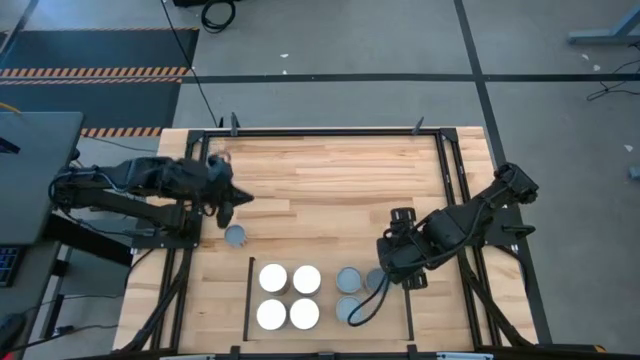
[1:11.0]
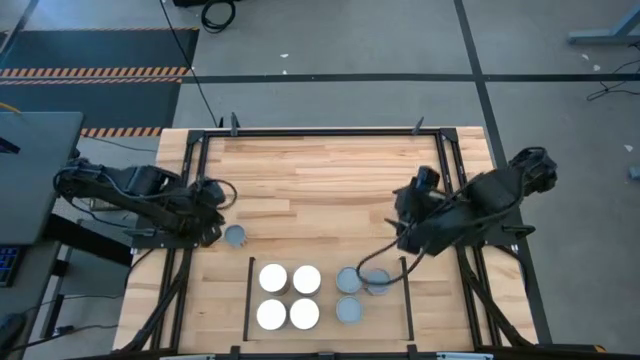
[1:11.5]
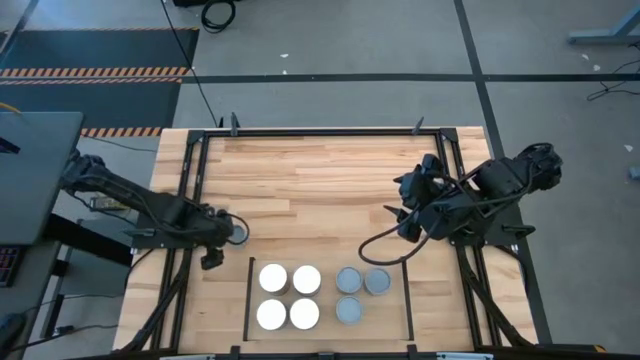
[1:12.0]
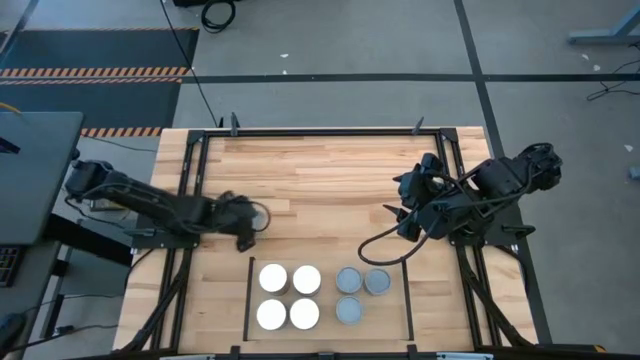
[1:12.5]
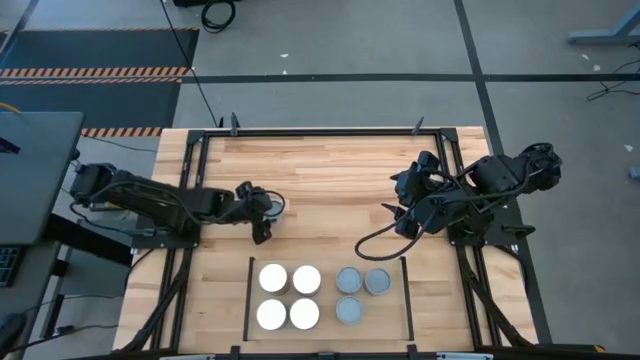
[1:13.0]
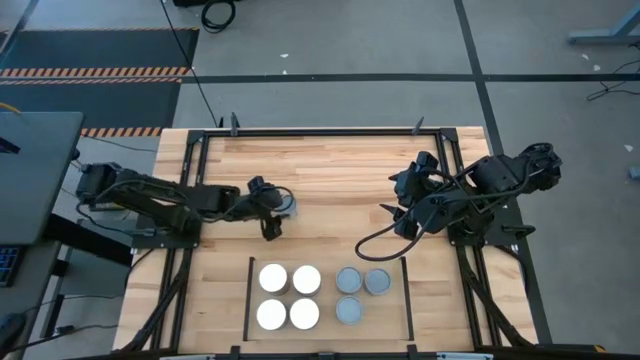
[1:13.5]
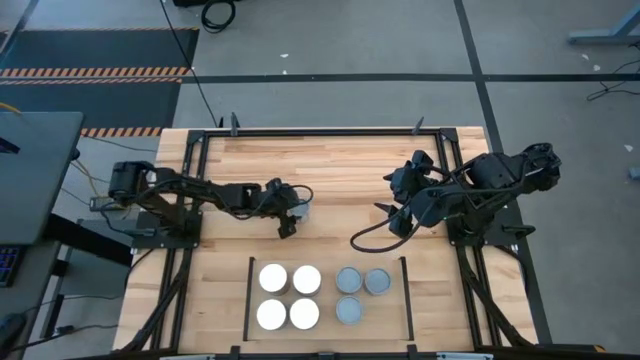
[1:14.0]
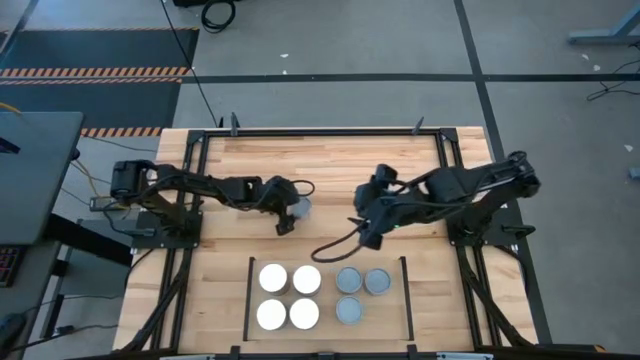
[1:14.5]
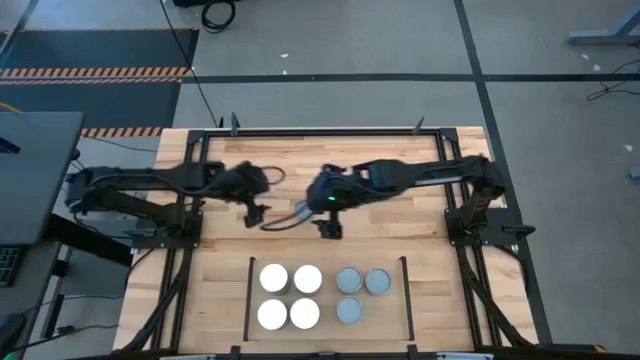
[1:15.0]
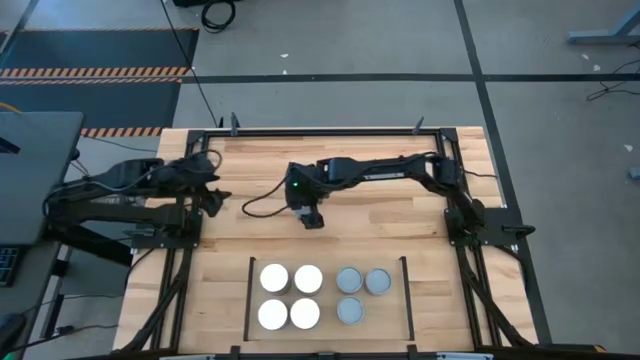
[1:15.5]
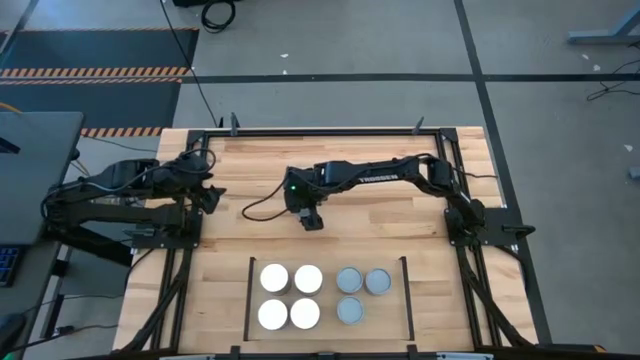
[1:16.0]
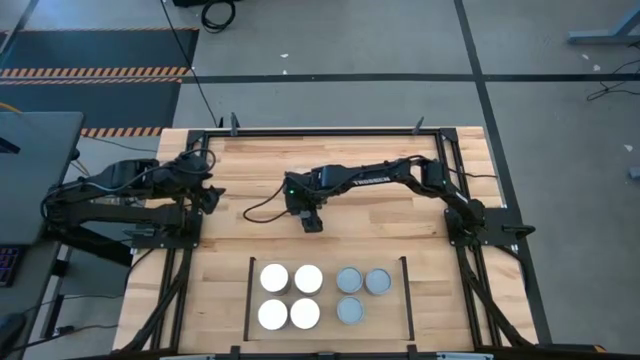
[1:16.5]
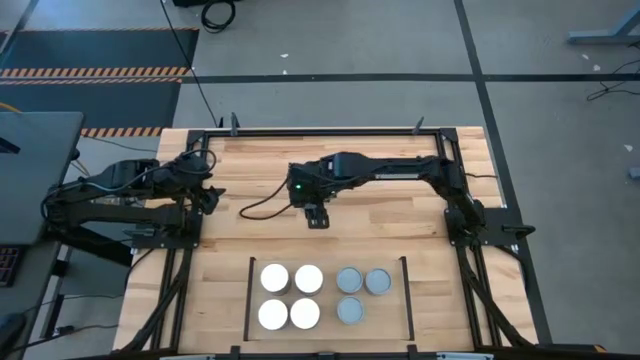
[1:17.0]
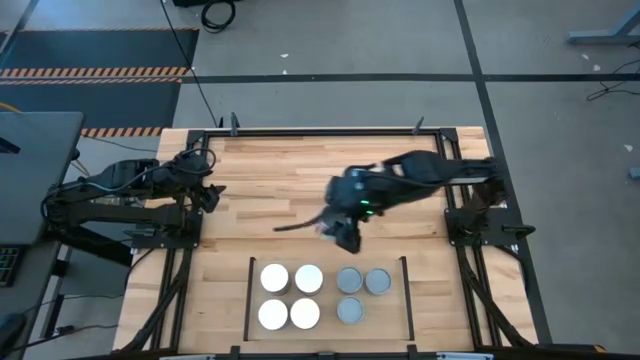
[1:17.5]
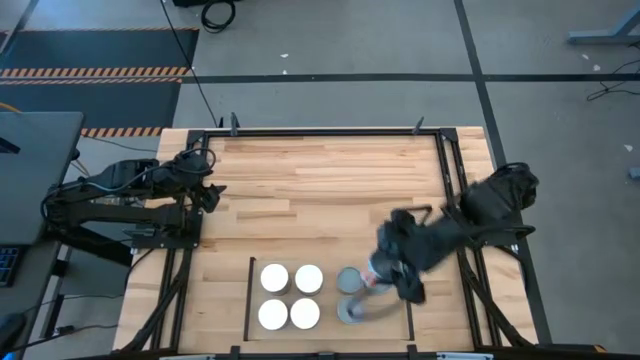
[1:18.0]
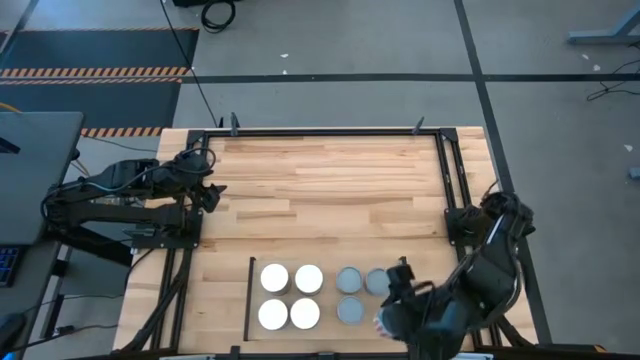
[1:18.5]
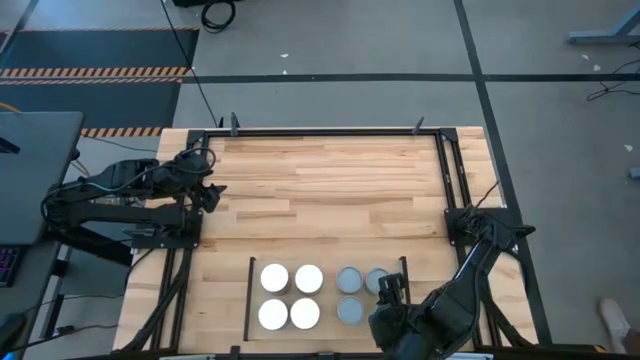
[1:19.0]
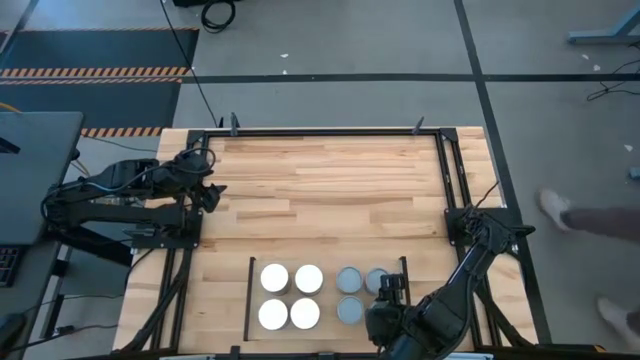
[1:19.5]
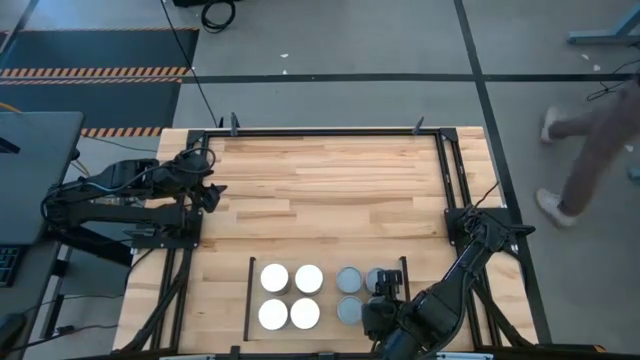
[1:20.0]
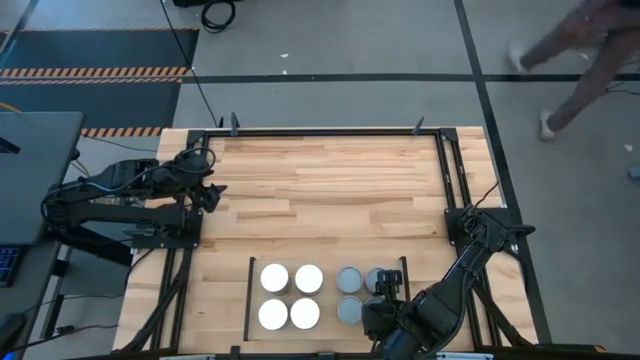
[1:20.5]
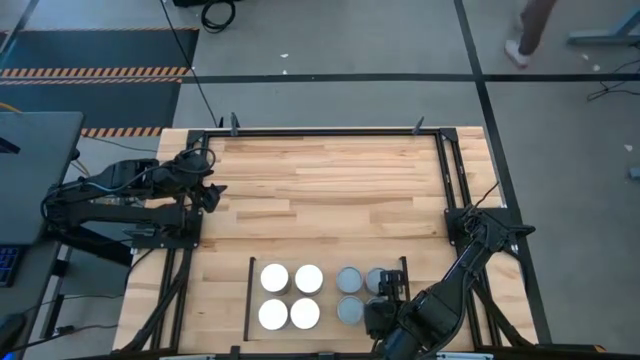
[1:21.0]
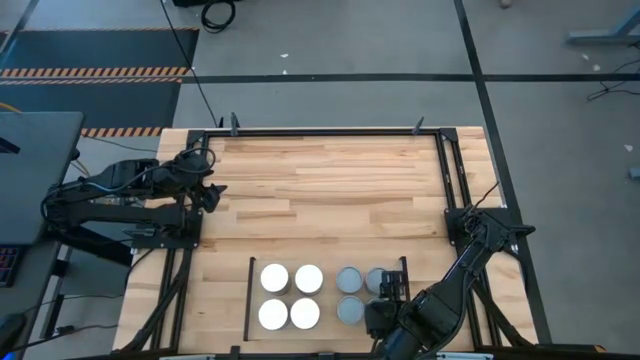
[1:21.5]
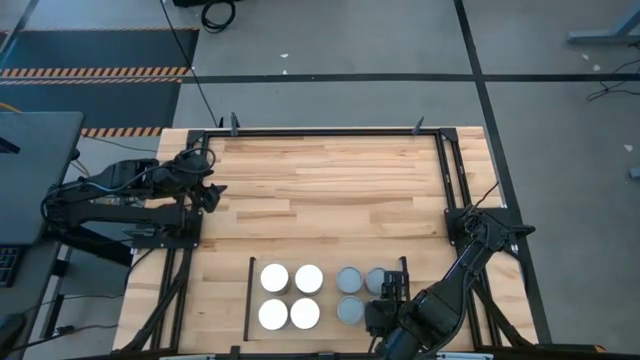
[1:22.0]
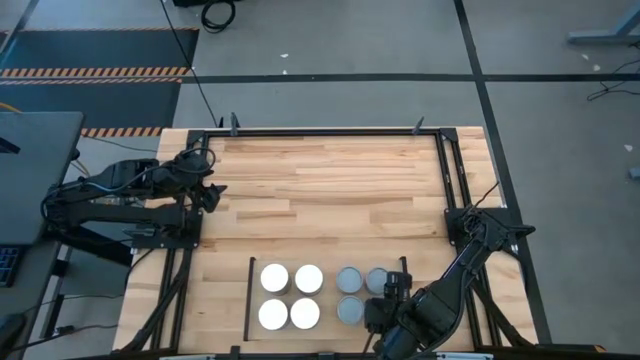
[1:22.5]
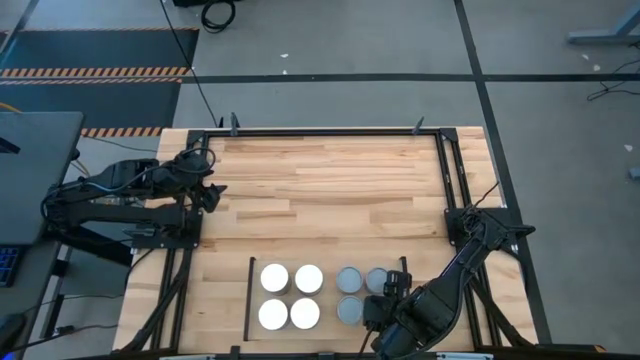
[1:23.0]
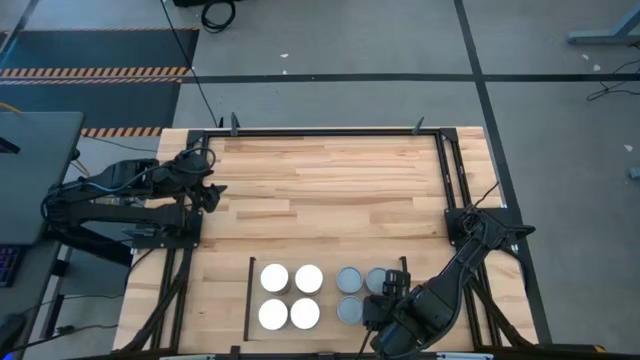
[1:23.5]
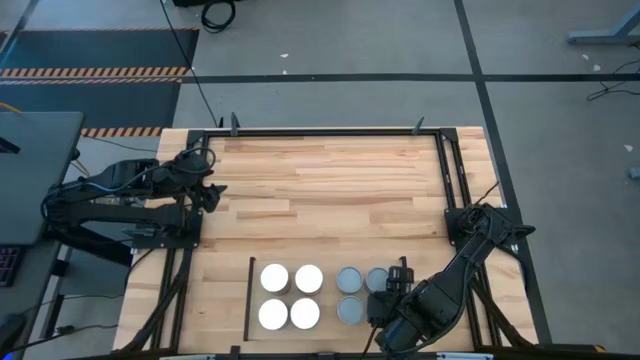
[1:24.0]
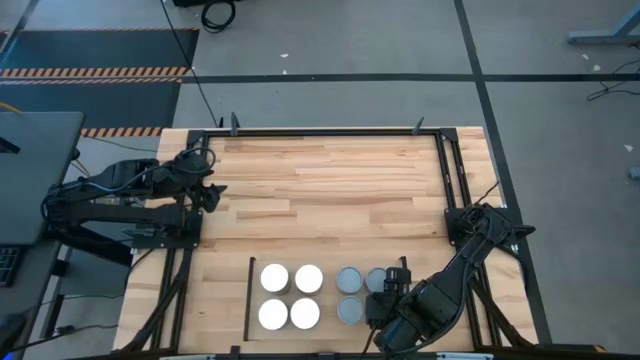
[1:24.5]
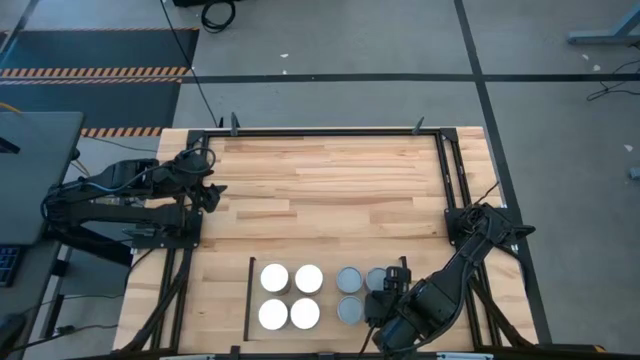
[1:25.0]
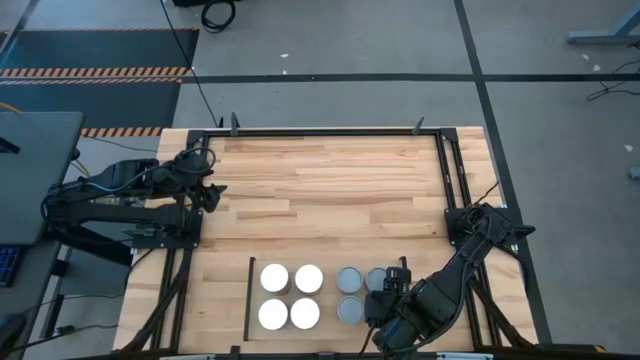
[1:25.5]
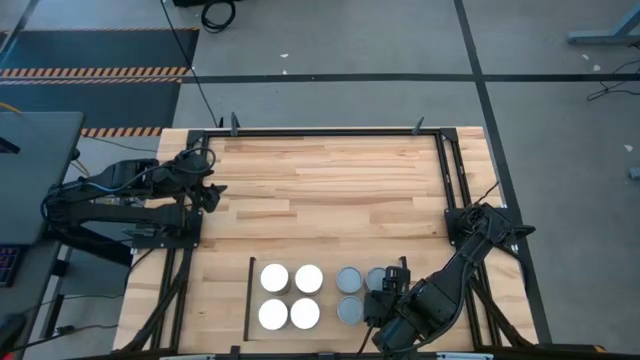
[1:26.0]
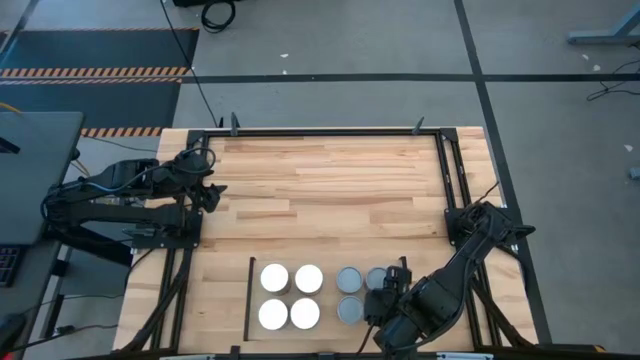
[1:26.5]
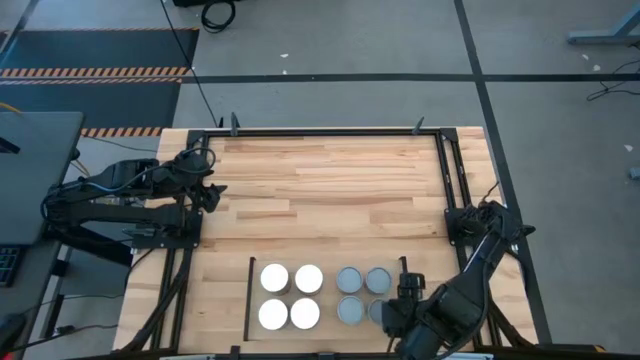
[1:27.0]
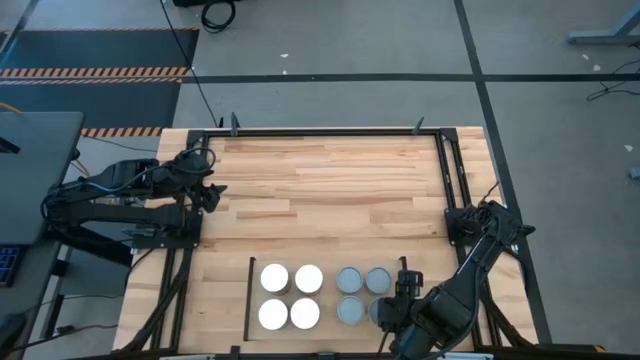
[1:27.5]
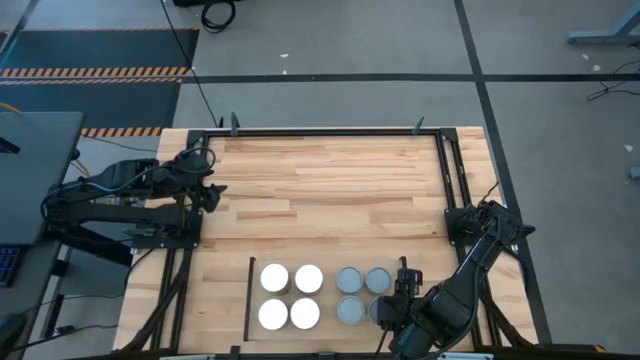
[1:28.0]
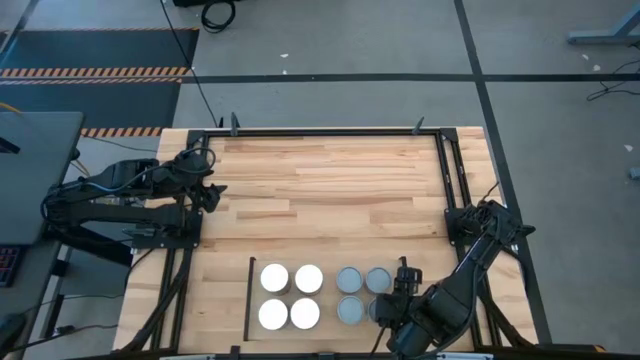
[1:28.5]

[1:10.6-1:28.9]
Task: Pick and place cans onto a shelf
Put the canned carrots on the shelf

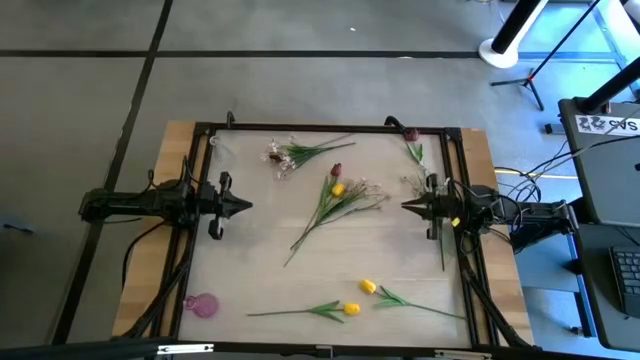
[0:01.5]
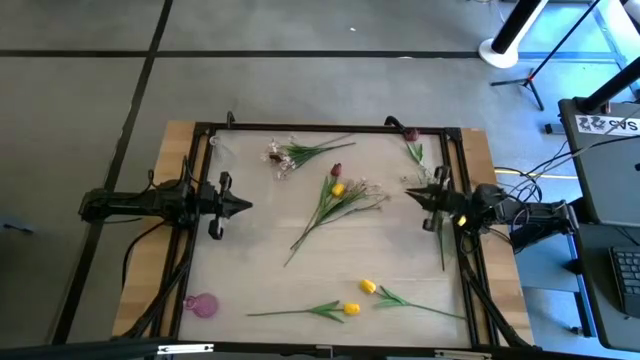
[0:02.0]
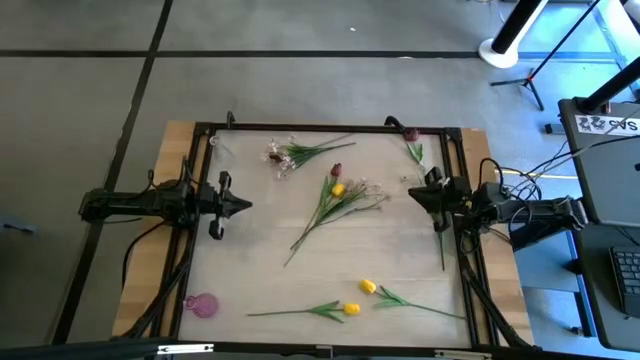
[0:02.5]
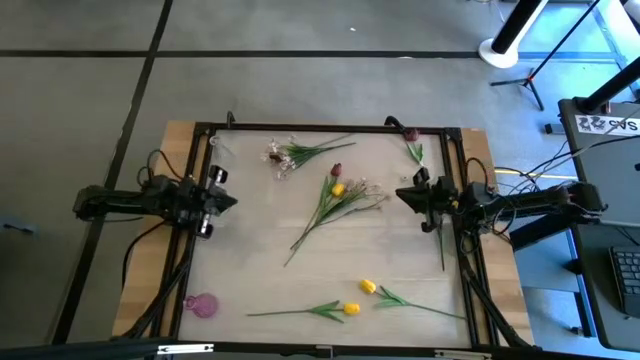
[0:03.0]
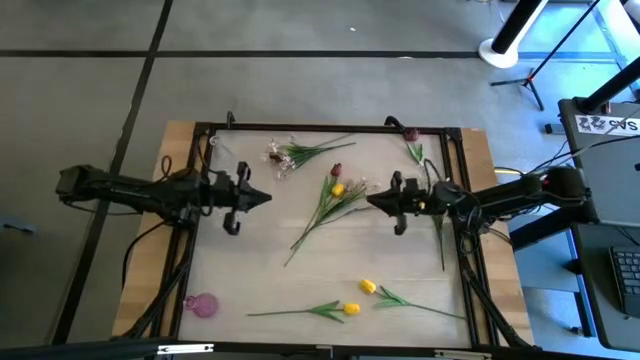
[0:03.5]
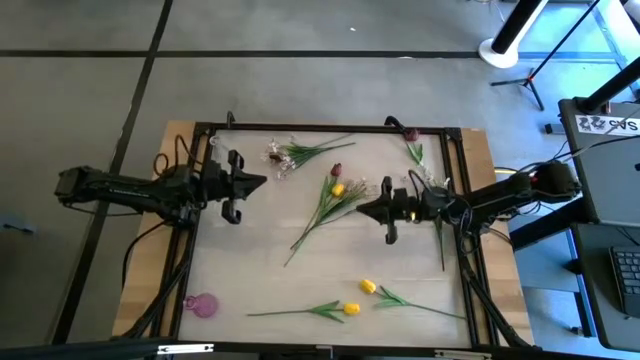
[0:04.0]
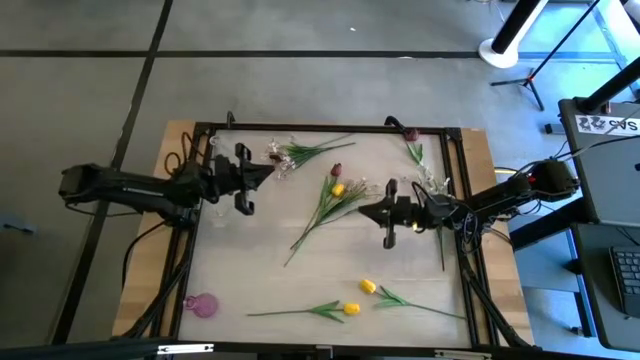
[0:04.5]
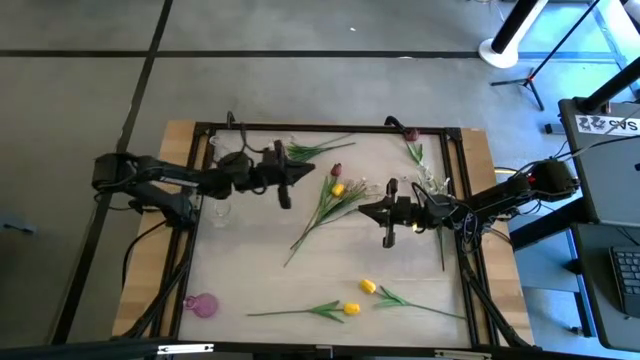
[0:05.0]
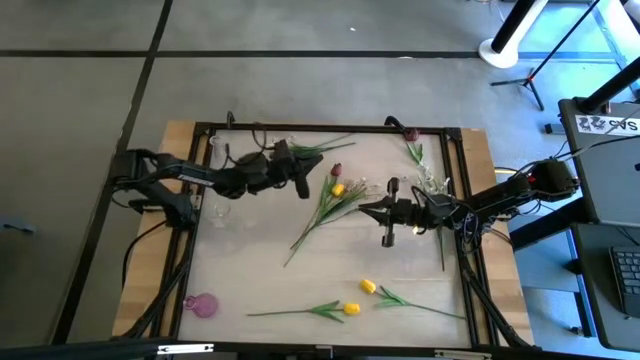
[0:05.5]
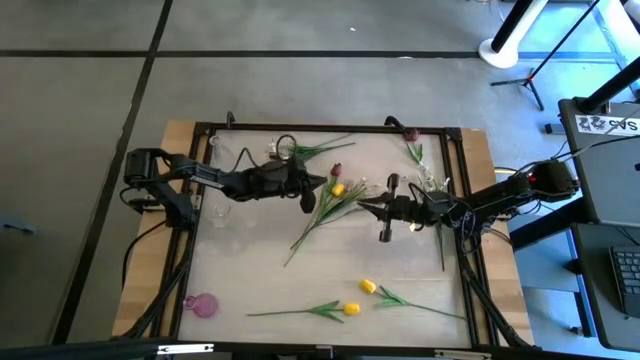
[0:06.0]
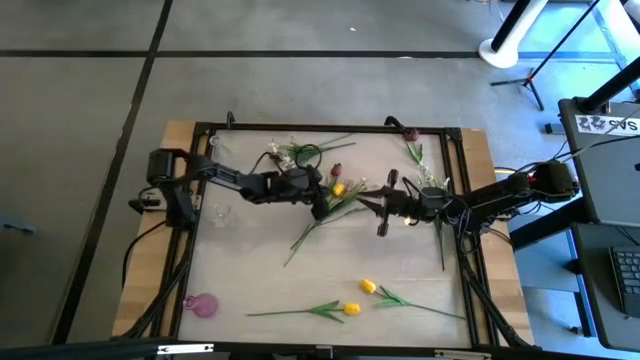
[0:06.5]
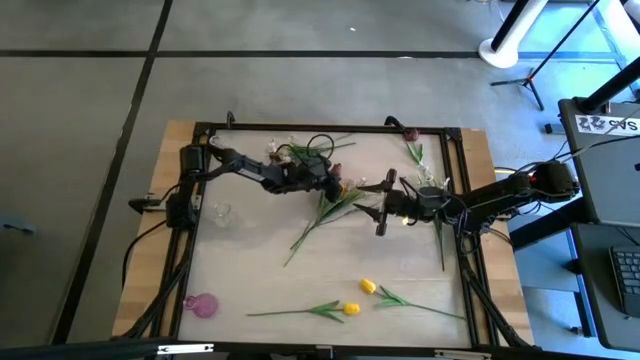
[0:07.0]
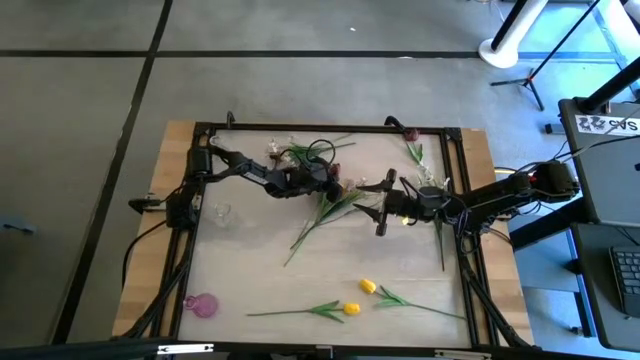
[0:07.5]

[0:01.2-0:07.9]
Task: Sort flowers into vase by color
Put the bottom red flower into the top transparent vase
